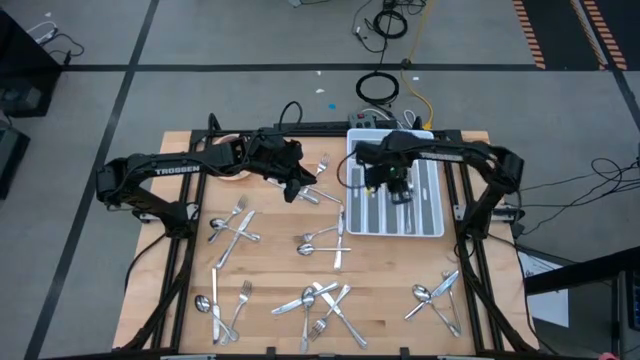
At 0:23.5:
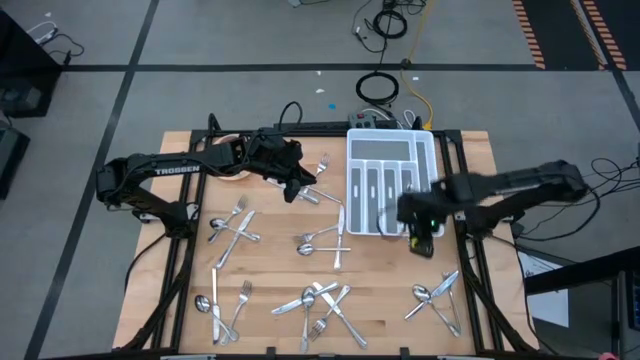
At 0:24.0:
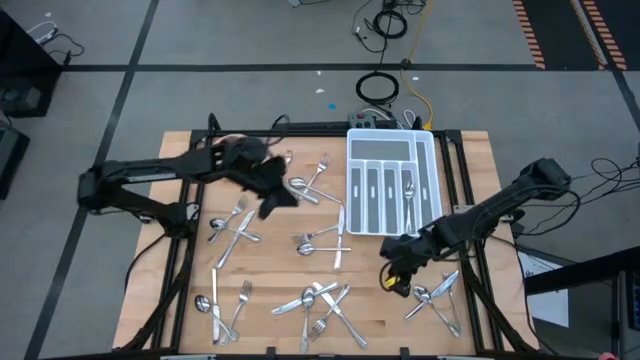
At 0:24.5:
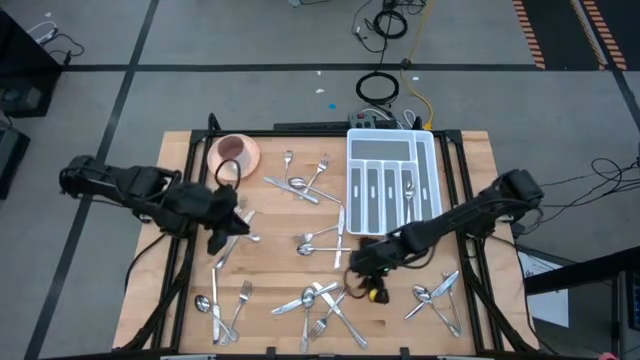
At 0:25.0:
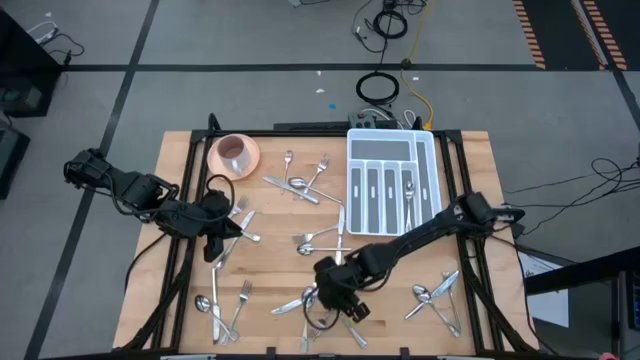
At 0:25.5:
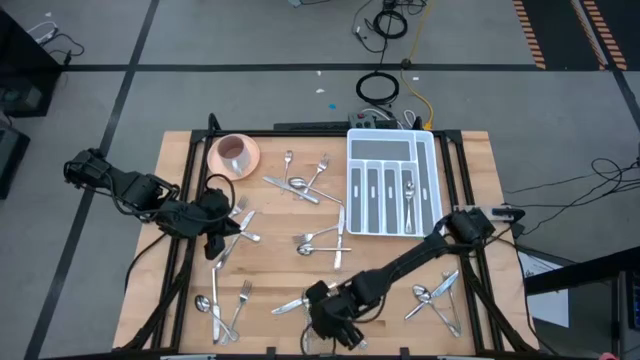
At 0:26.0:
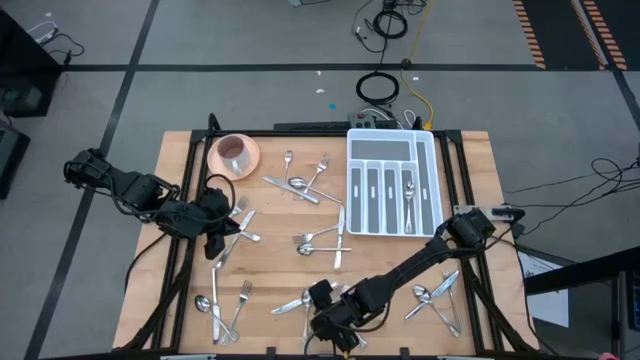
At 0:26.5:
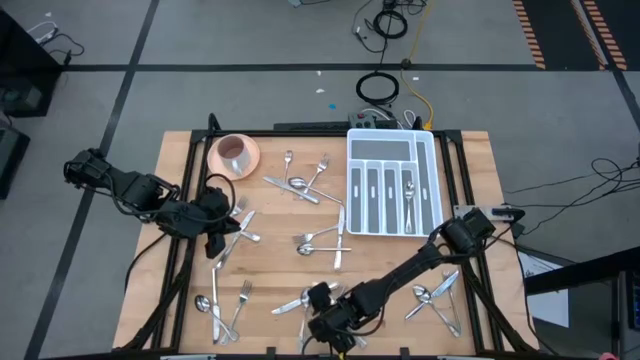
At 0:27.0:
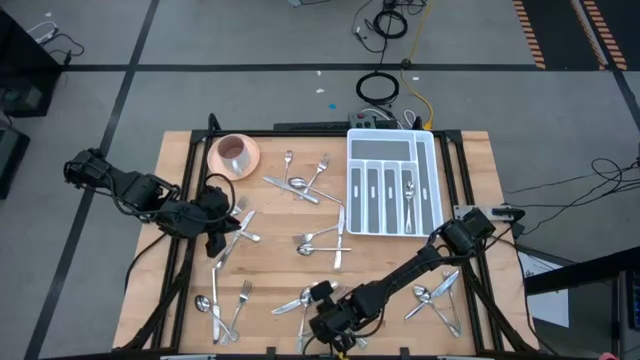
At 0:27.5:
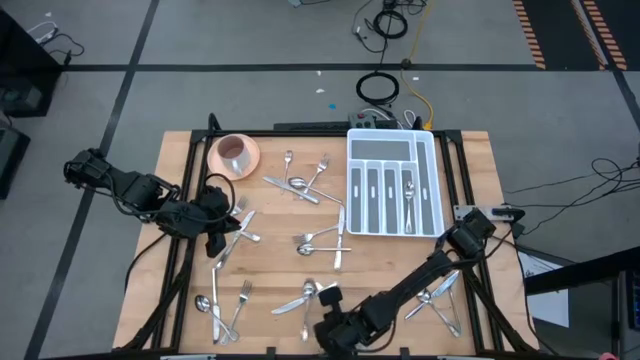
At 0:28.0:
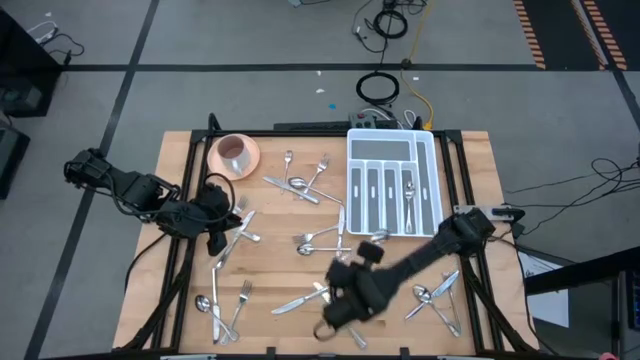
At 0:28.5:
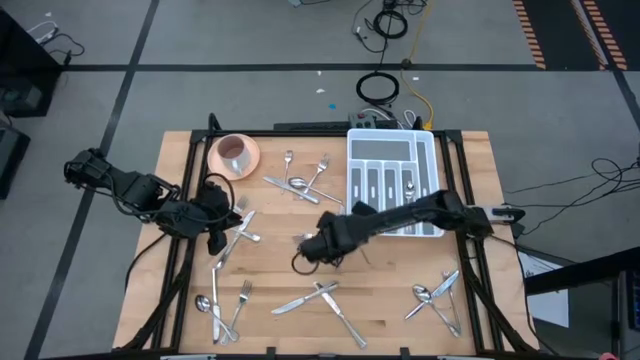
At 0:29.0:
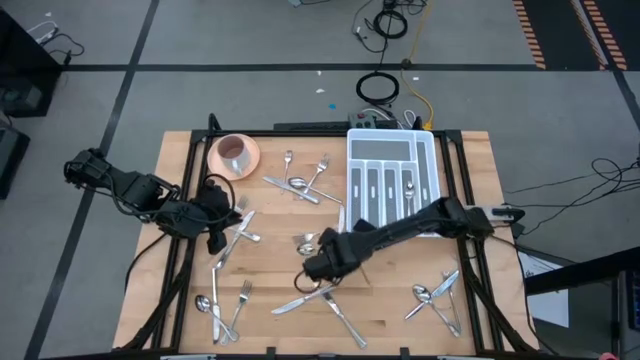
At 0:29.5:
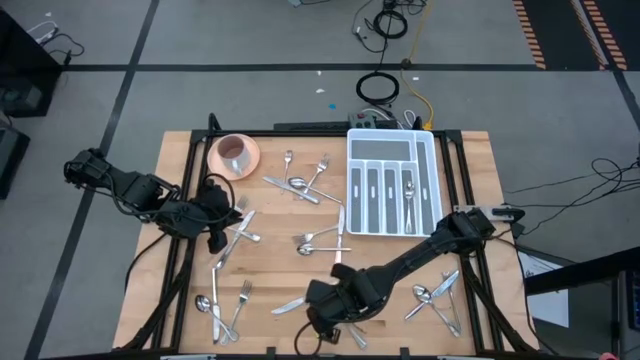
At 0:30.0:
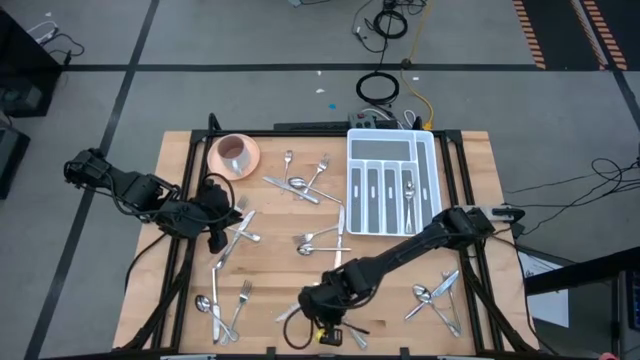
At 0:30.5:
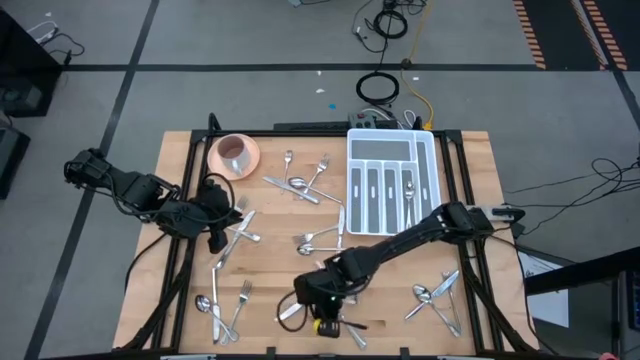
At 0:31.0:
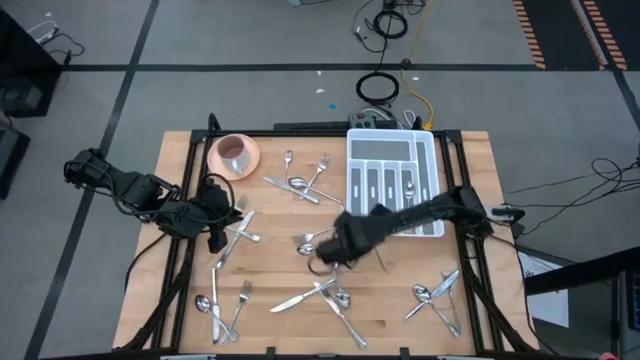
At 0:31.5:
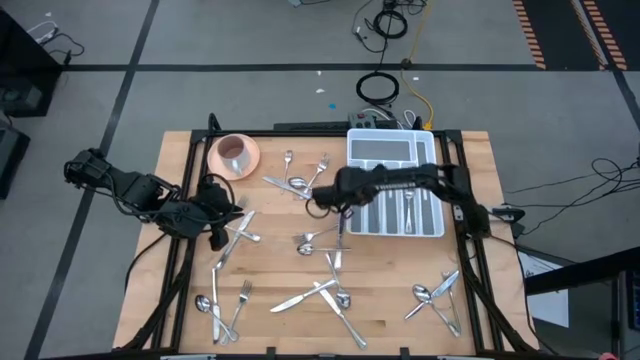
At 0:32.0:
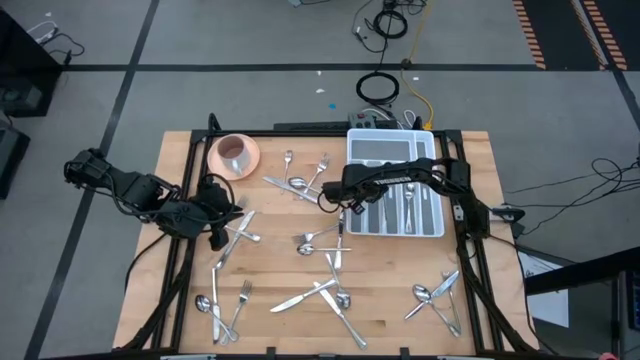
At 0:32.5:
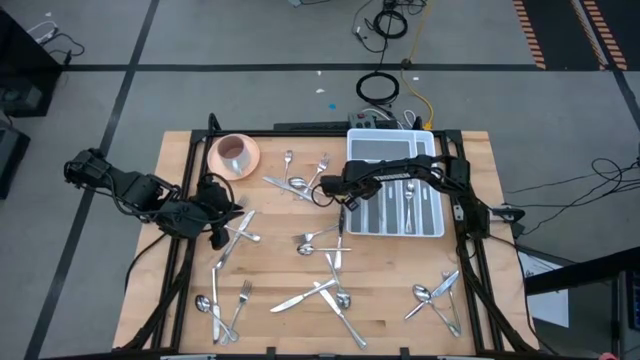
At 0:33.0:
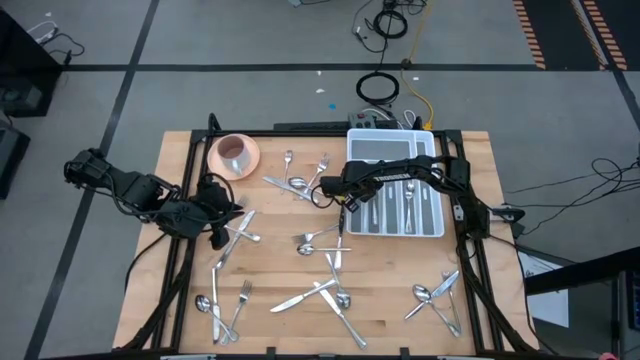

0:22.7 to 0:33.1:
Task: Sort silverware
Put the silver fork into the white silverware tray

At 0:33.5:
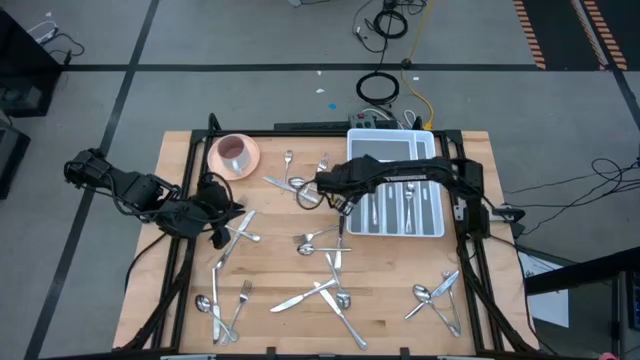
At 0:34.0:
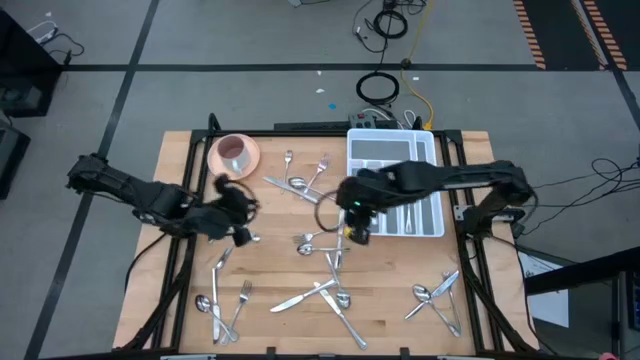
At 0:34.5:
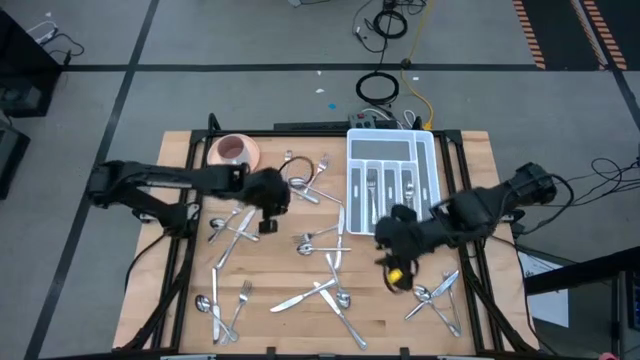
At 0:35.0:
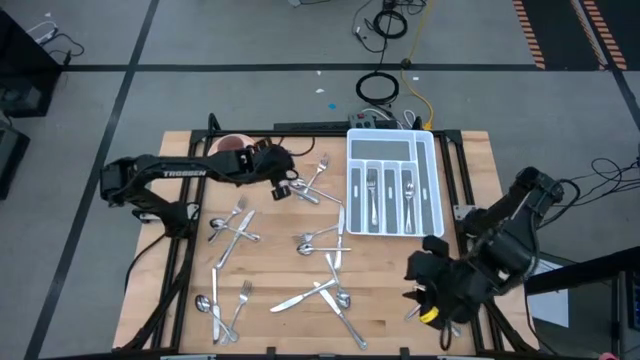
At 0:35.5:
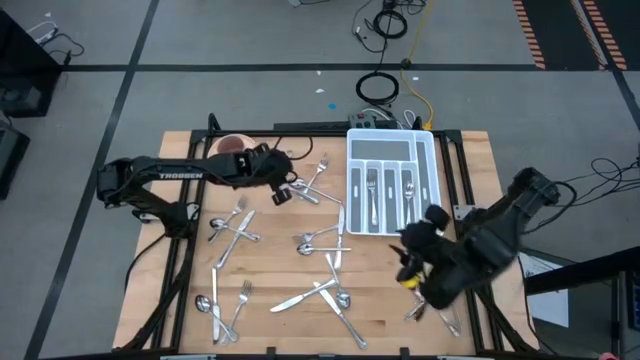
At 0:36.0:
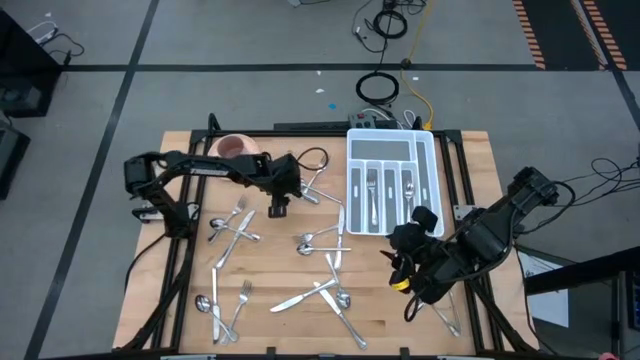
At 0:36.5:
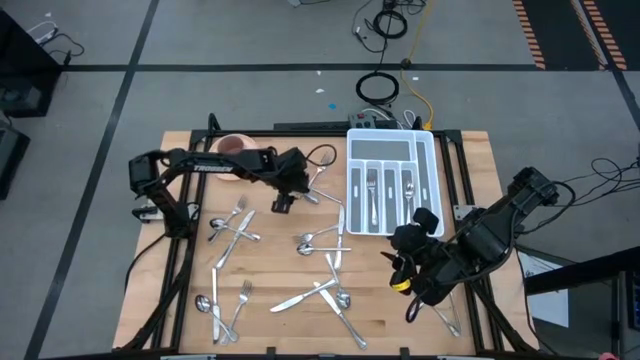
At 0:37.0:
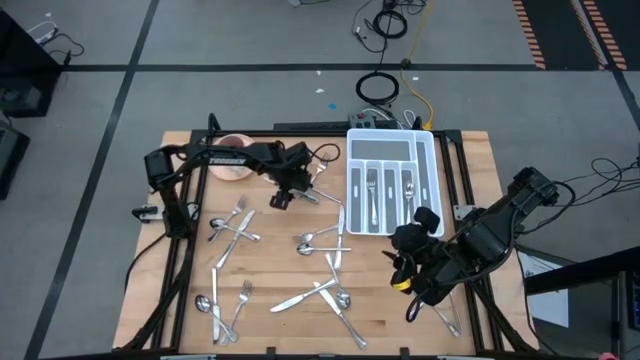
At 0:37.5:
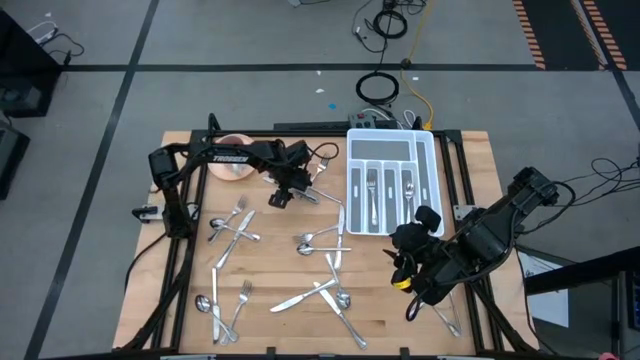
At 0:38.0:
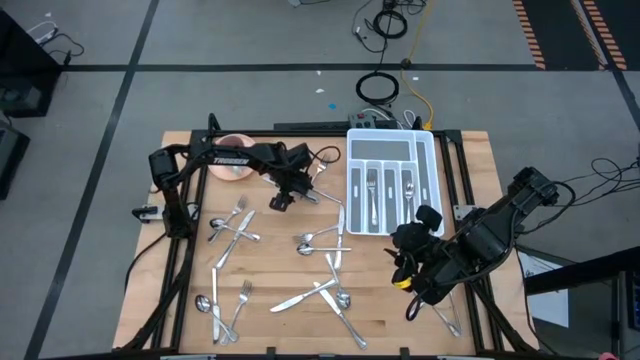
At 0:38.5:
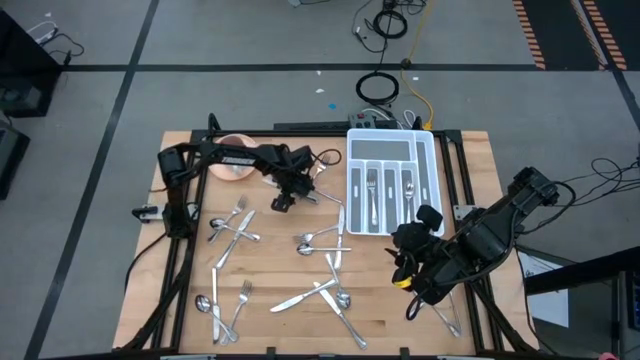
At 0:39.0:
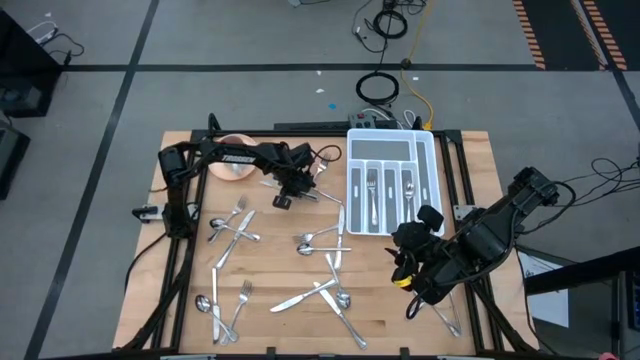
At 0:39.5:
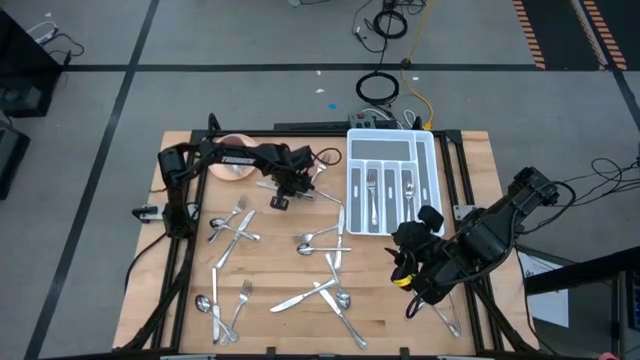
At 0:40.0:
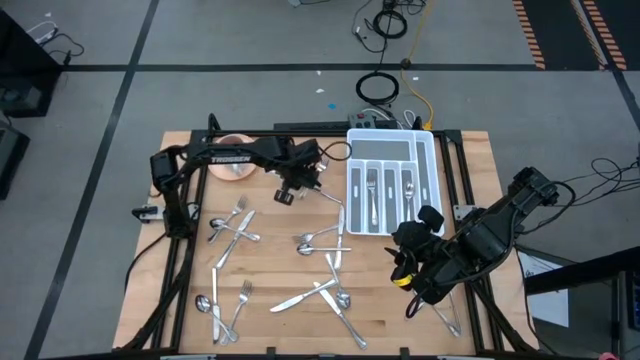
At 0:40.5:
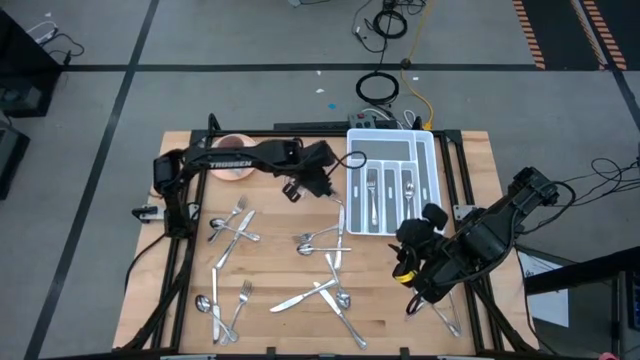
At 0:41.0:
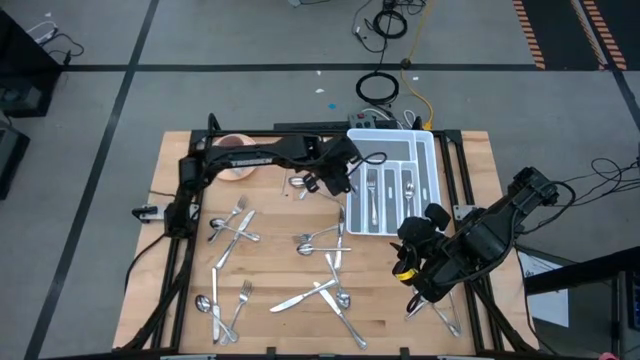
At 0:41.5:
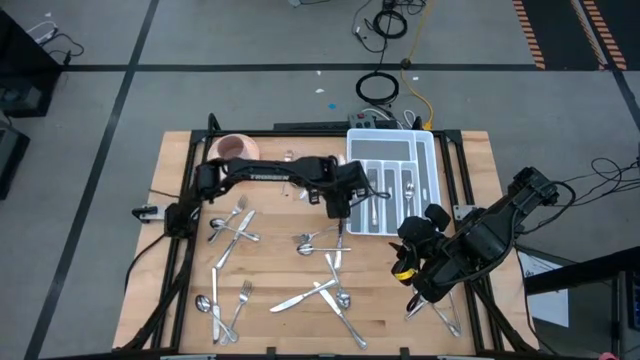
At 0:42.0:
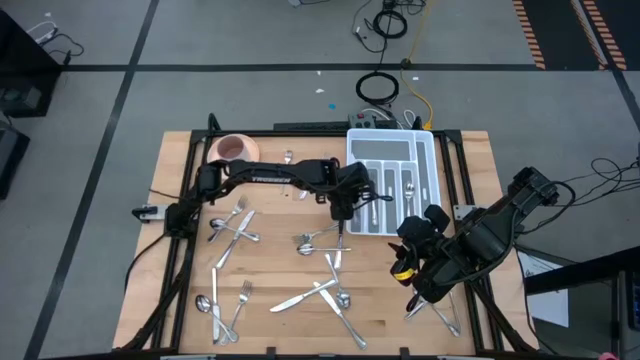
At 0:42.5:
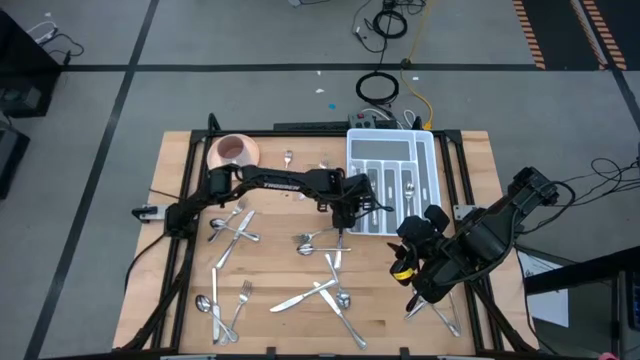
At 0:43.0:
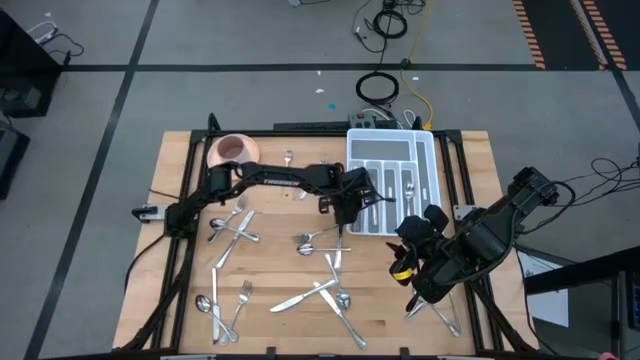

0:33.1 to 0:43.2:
Put the silver knife into the white silverware tray
